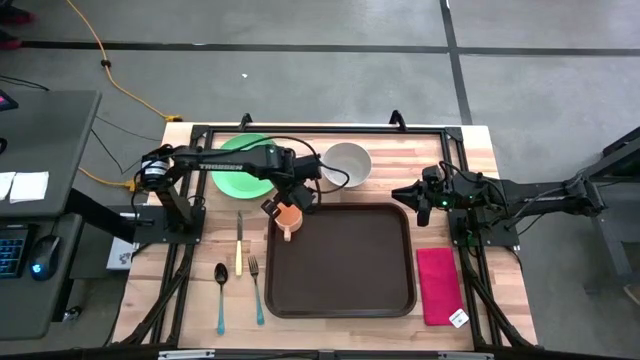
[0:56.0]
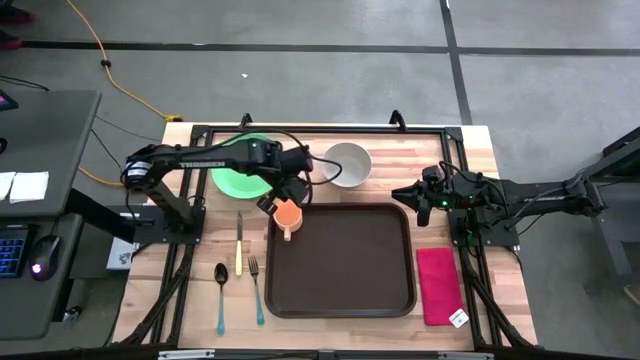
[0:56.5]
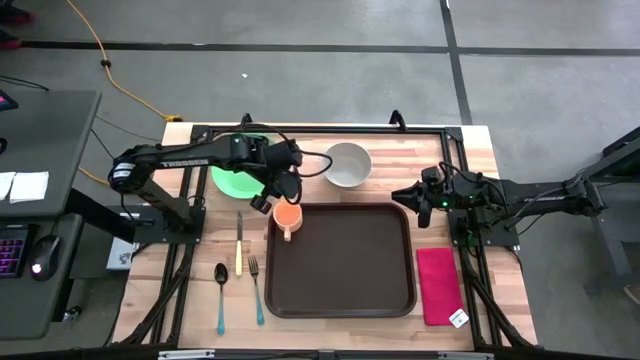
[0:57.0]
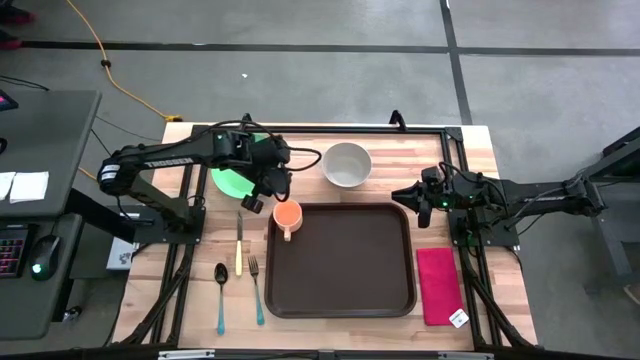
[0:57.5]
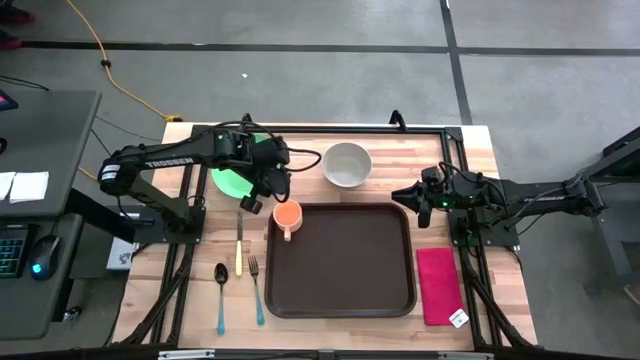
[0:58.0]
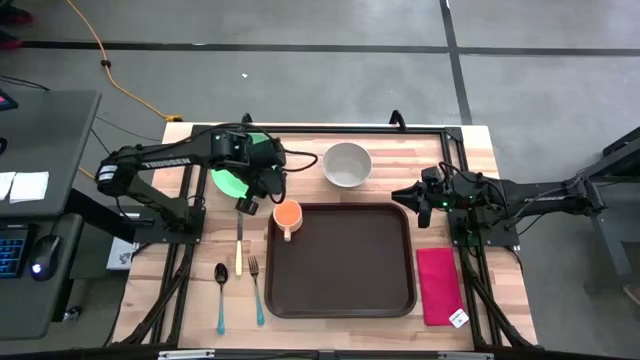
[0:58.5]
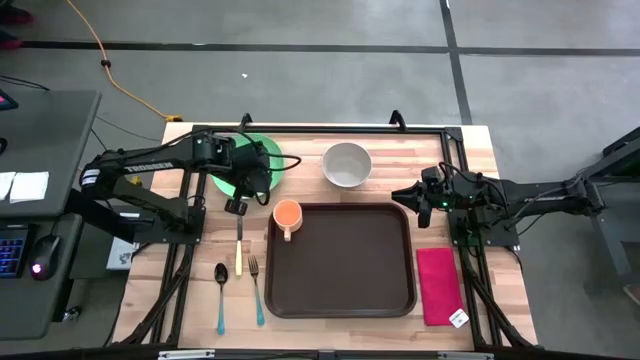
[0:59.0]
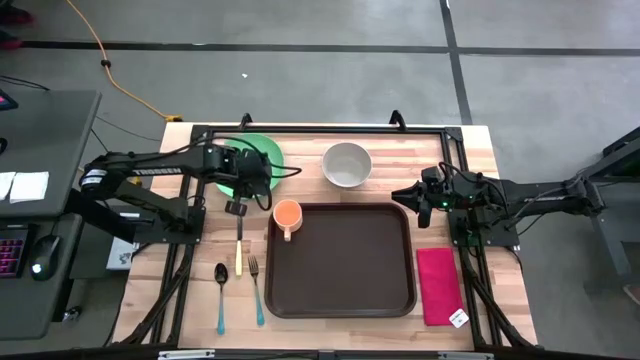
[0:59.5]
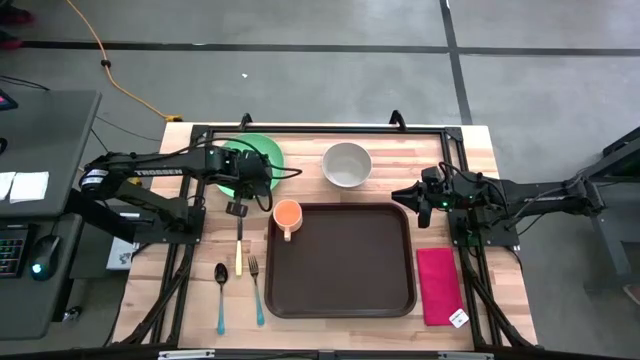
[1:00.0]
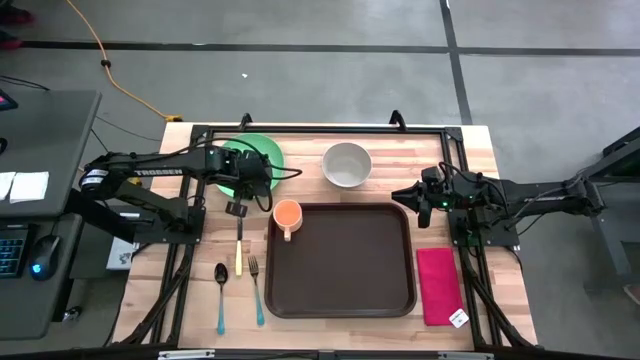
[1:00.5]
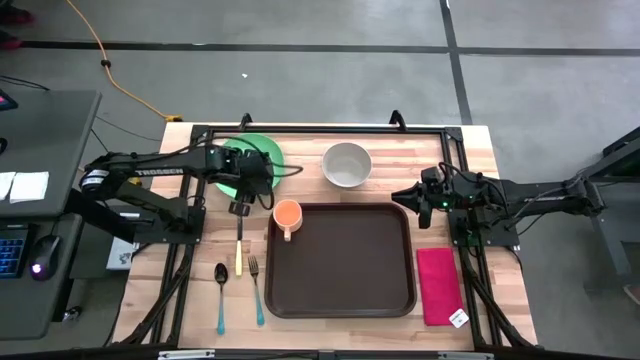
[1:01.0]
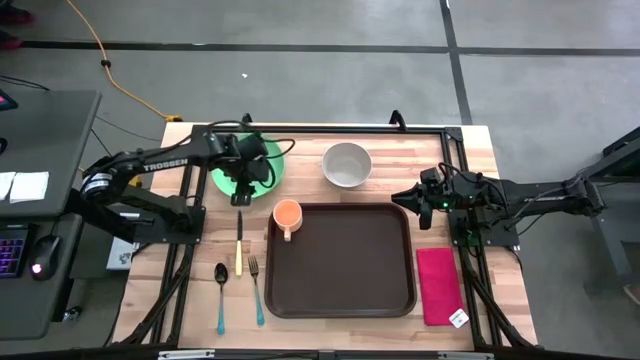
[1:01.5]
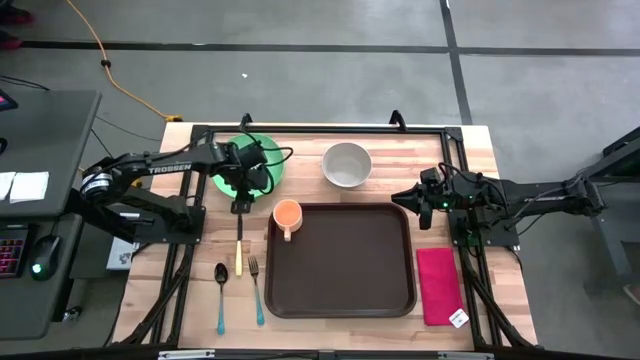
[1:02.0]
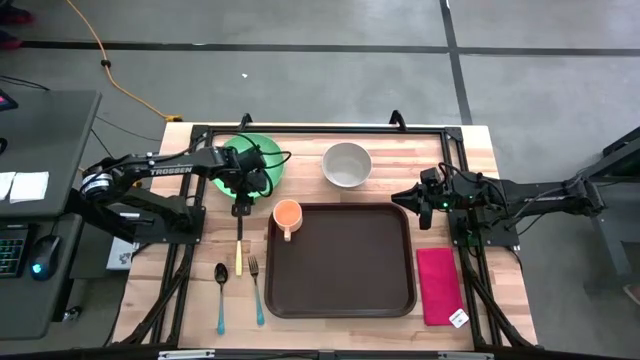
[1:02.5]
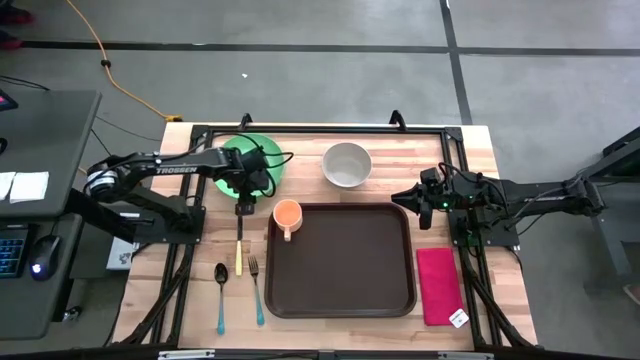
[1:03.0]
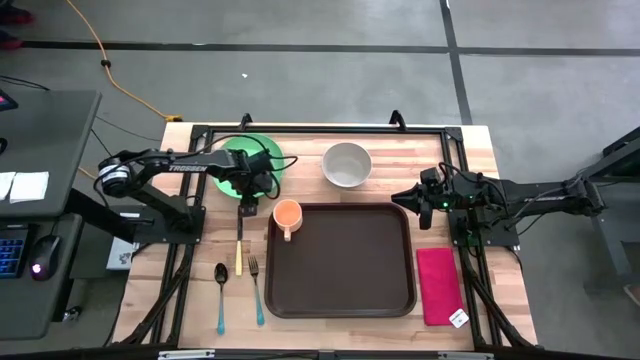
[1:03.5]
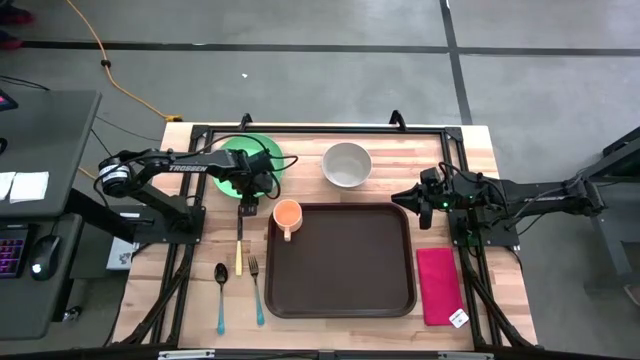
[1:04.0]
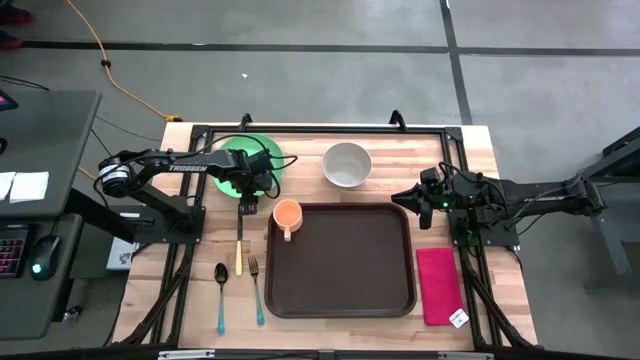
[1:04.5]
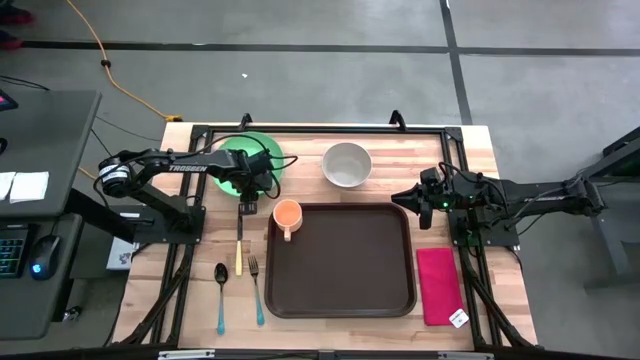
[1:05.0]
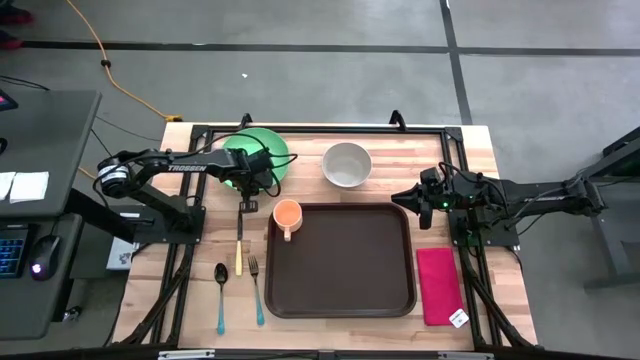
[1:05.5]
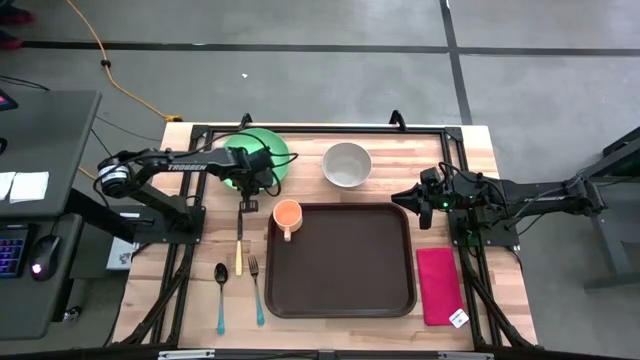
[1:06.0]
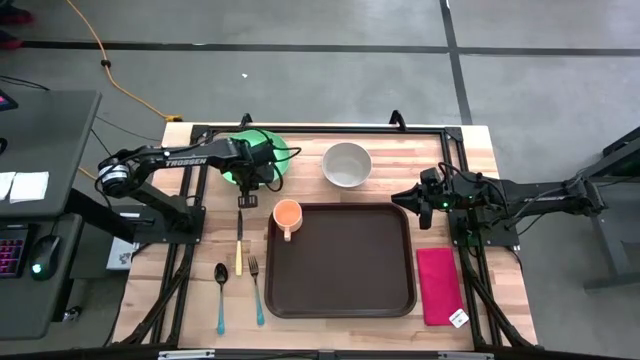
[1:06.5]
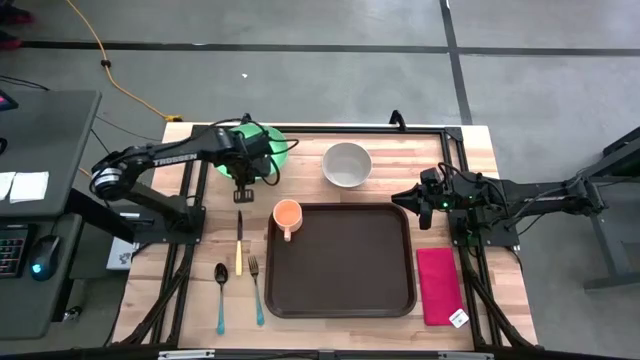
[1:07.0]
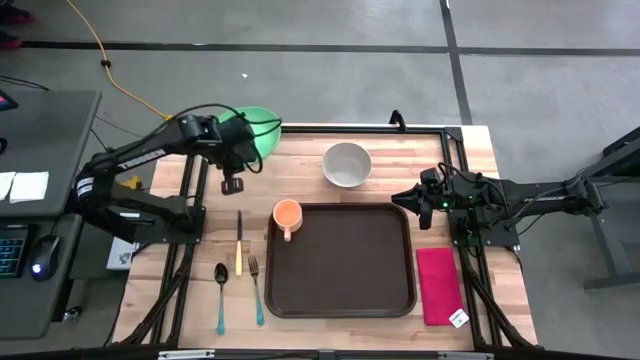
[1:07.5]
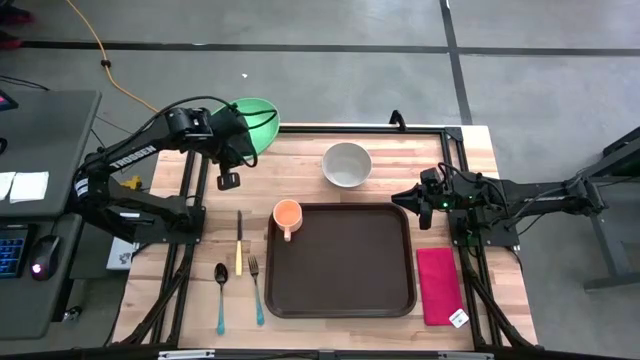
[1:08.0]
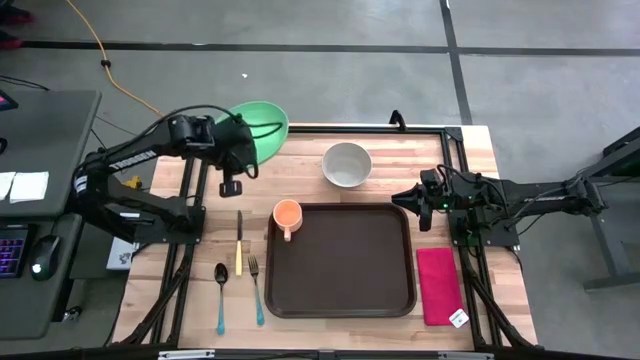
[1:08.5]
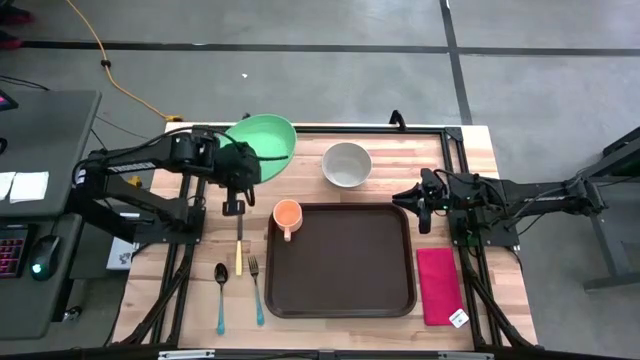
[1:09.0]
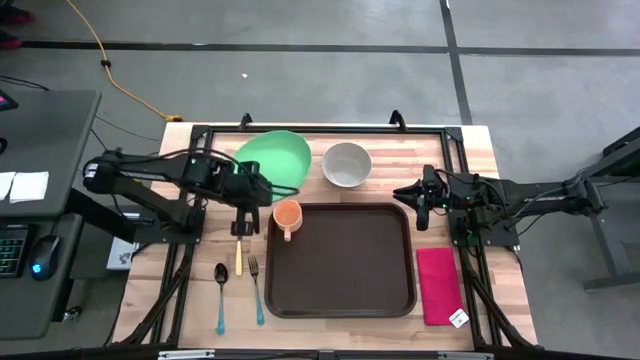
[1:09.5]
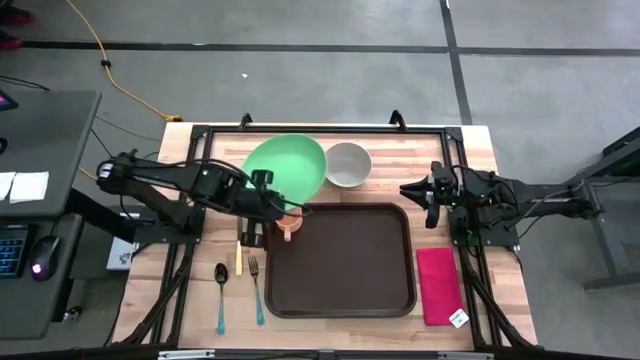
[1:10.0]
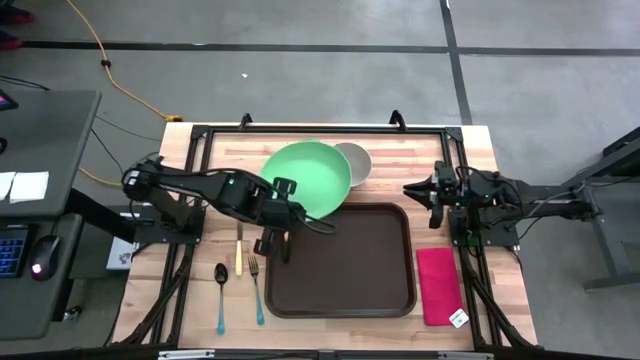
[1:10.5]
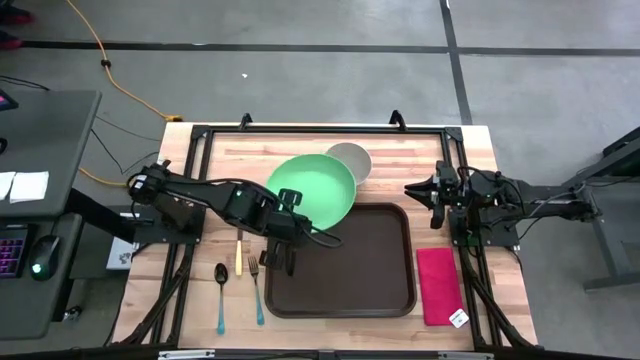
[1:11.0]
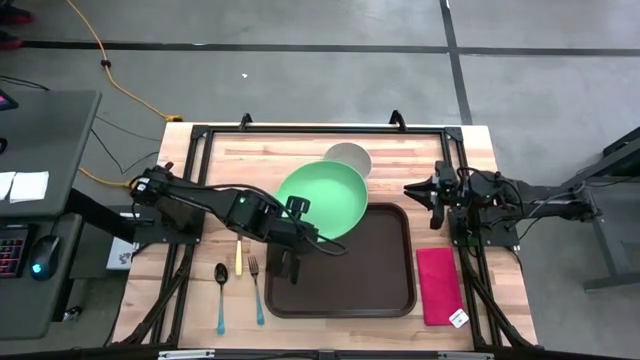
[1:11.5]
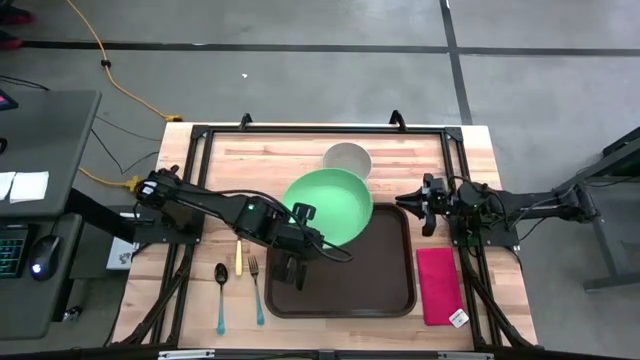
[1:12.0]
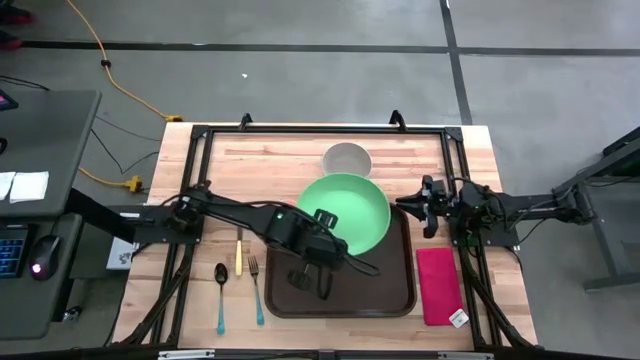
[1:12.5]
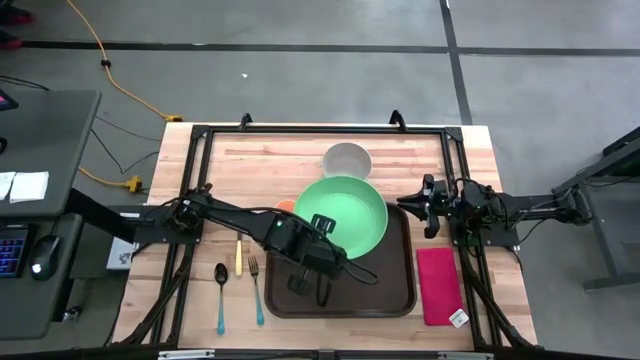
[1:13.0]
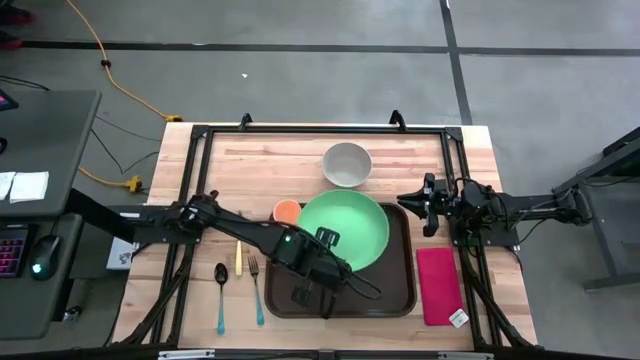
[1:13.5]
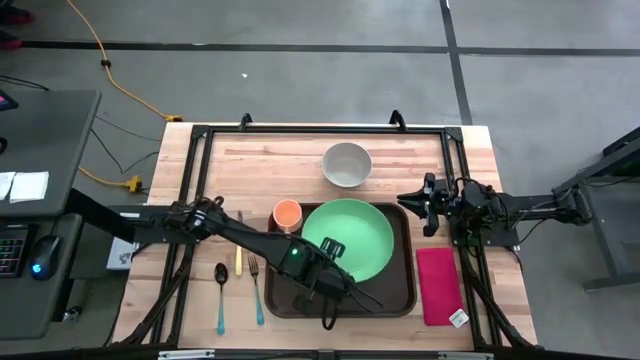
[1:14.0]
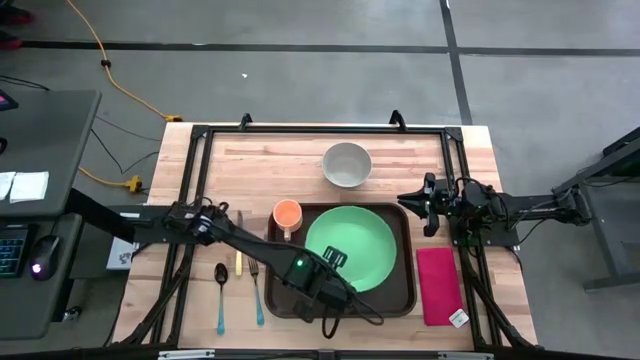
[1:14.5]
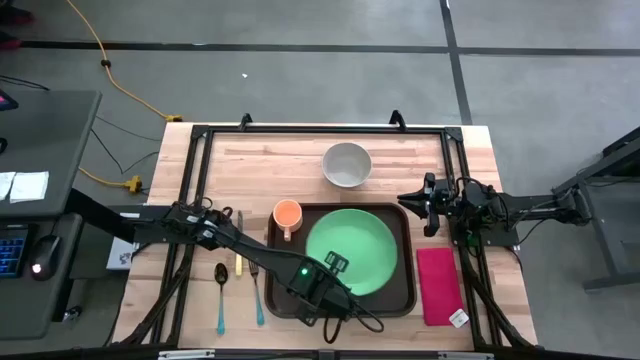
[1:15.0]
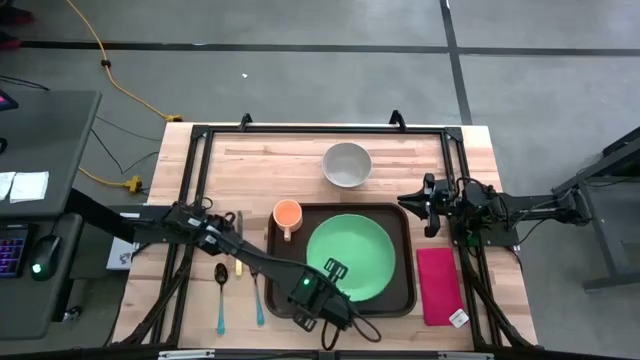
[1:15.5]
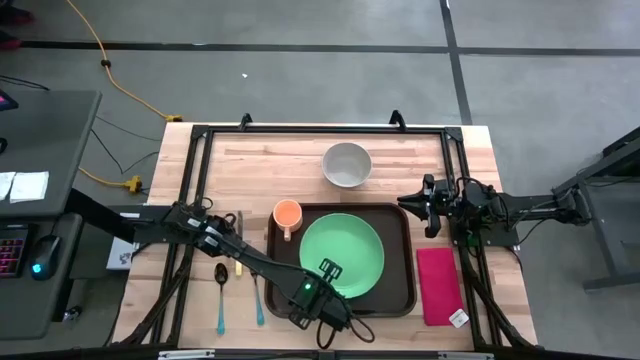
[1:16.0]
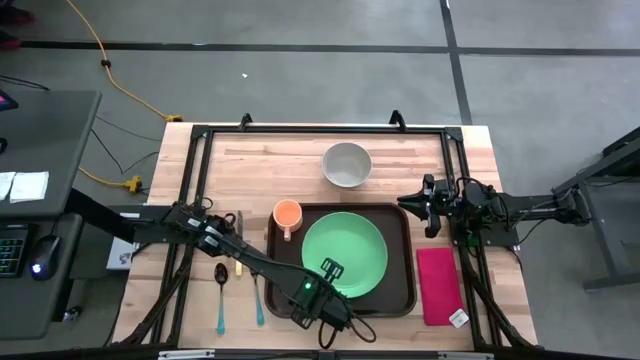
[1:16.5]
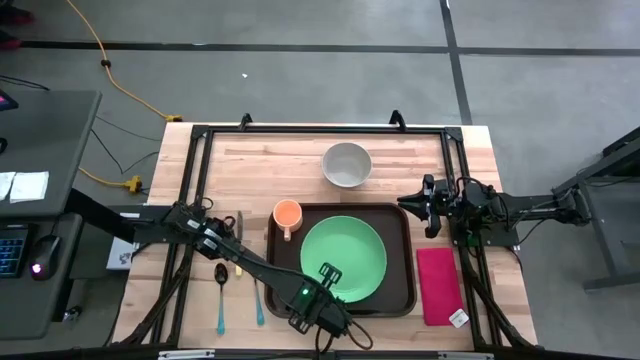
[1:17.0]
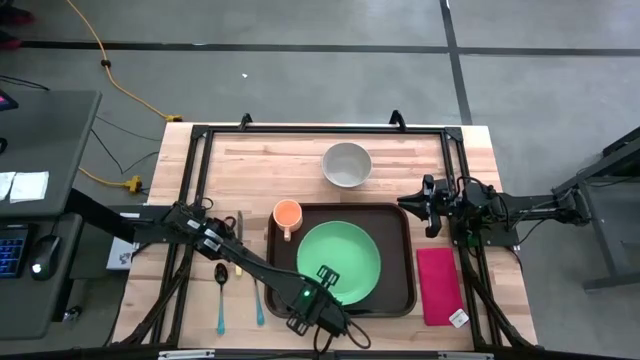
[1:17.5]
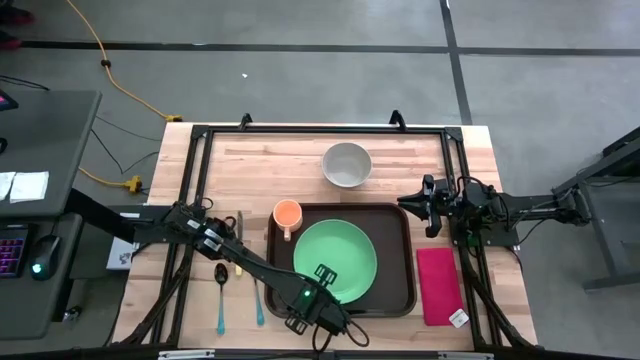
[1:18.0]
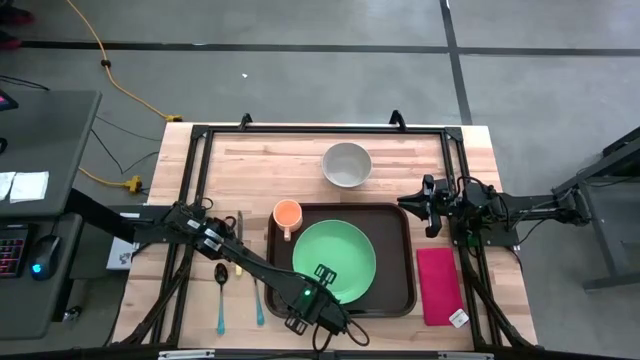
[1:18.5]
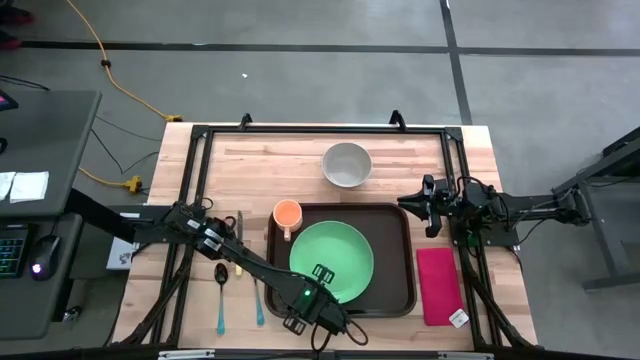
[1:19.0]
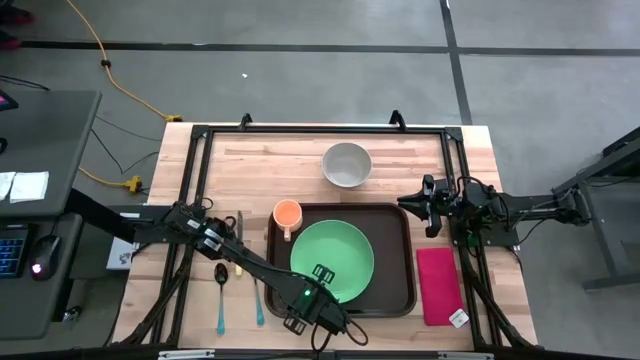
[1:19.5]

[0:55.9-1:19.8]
Task: Set up tray
Put the green plate under the yellow mug on the brown serving tray
